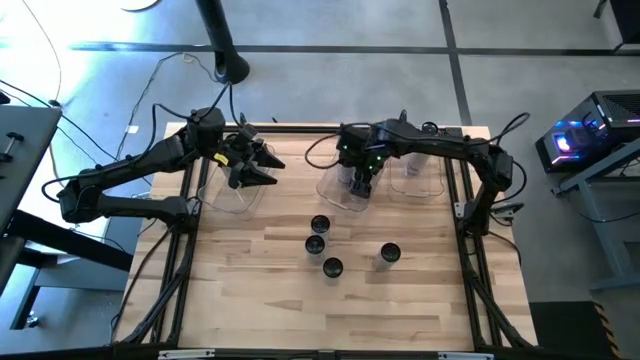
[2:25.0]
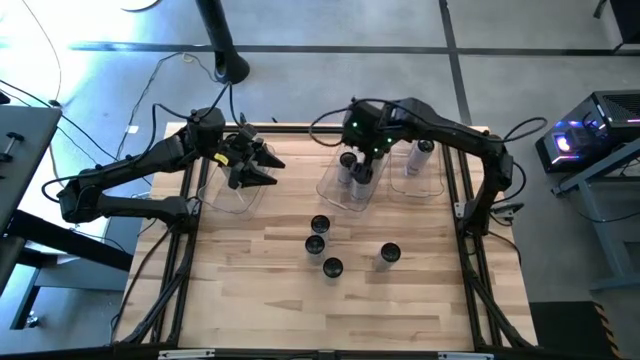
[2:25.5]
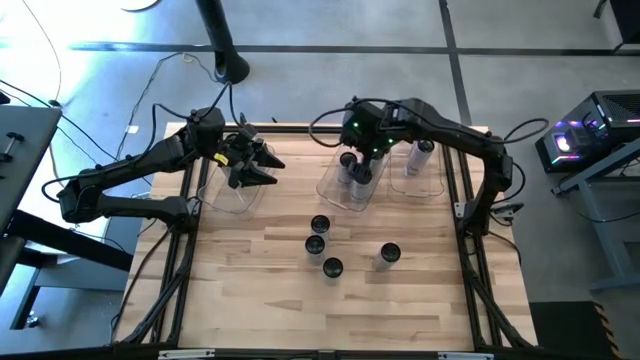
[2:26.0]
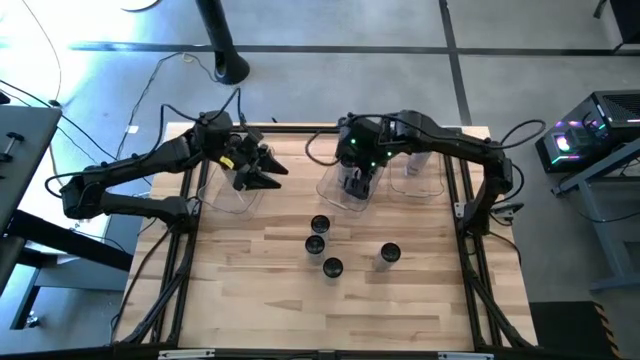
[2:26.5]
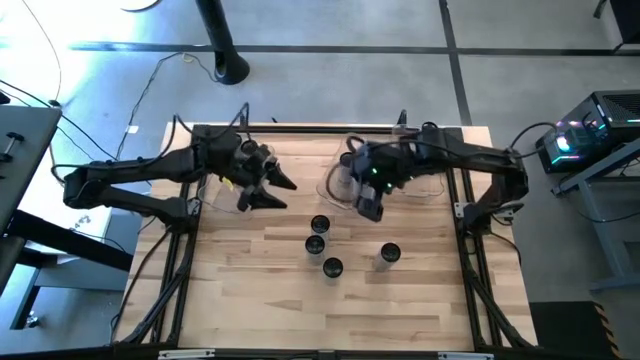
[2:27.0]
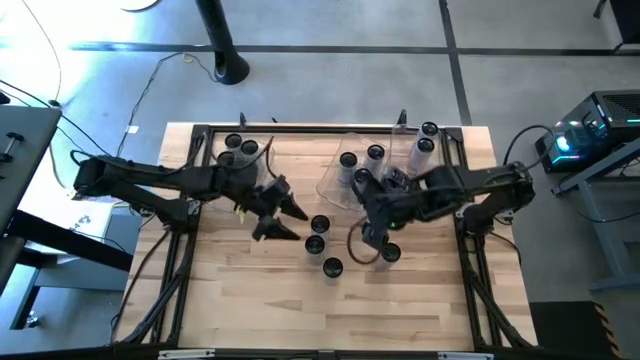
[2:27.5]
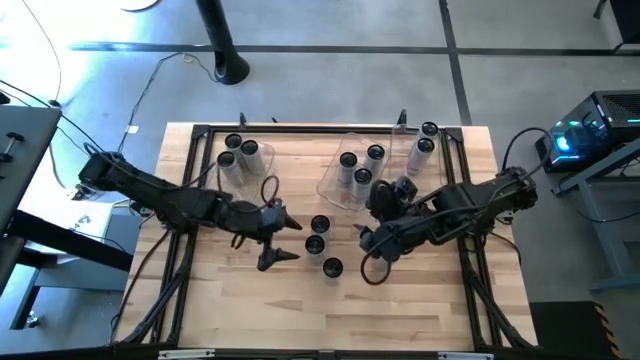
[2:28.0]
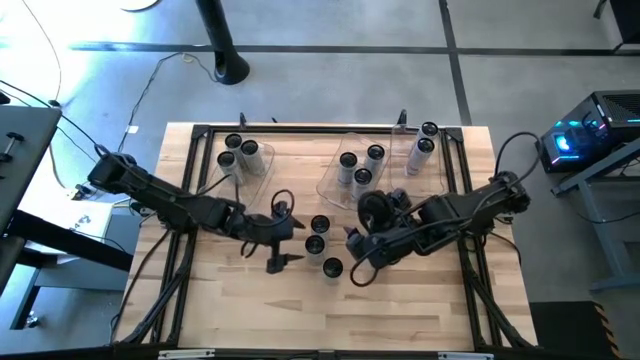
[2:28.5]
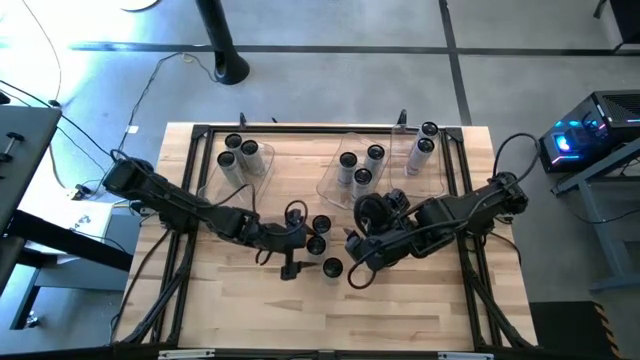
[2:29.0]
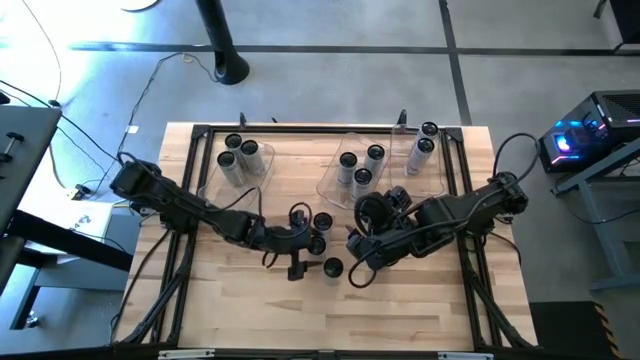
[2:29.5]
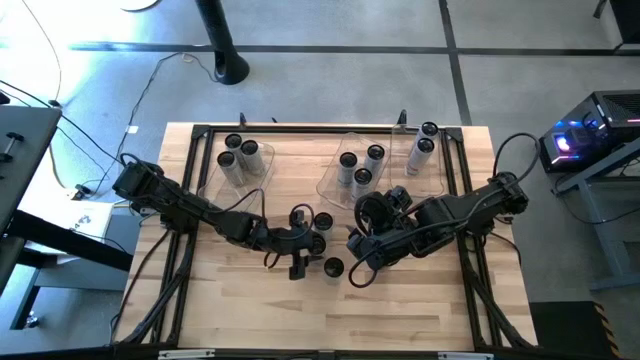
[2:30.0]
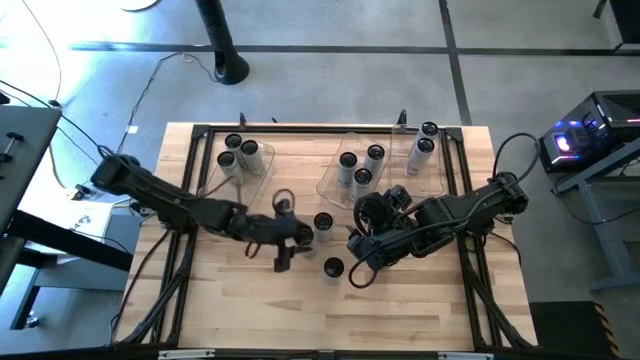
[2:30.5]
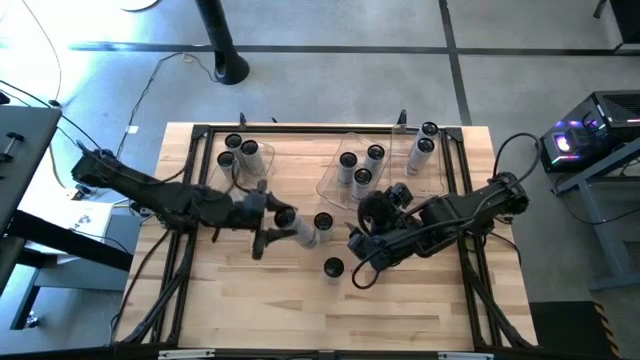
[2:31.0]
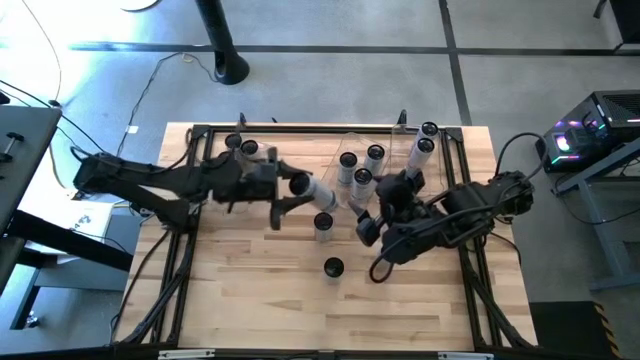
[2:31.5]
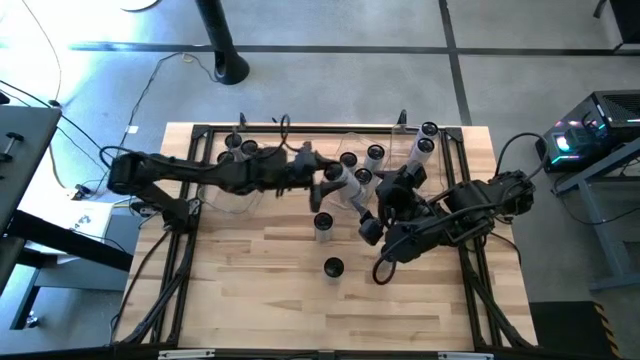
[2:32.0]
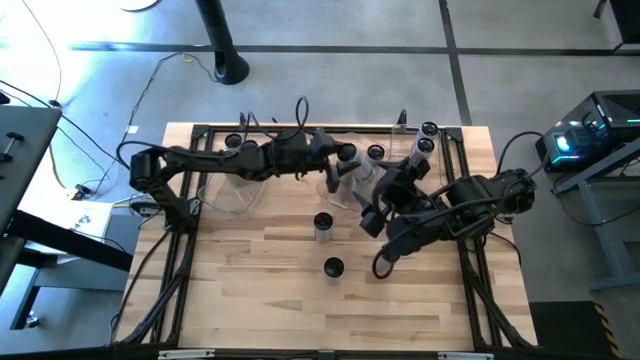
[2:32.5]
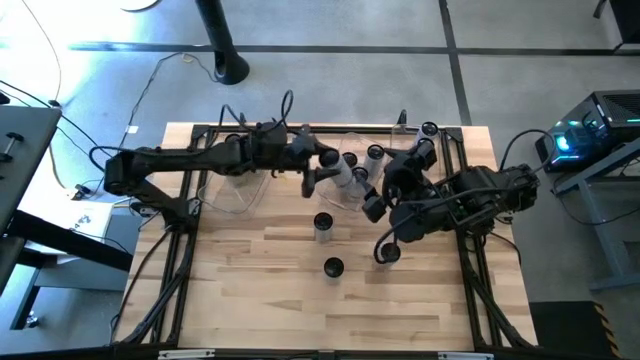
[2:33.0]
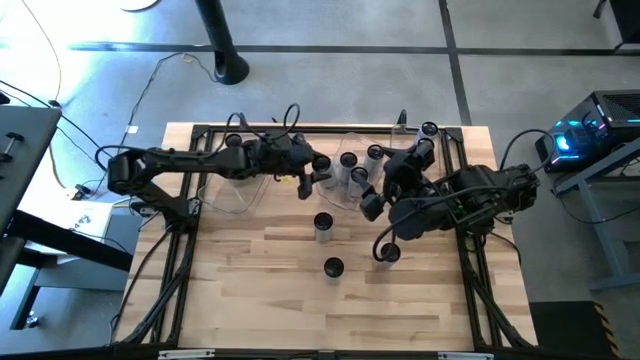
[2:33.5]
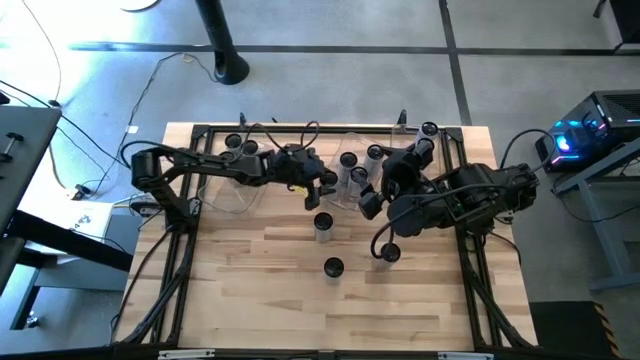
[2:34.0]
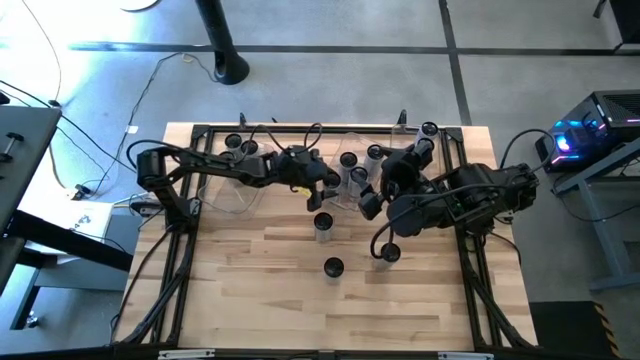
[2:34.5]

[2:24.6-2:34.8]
Task: Sort soda cans
Put the white-blue soda can into the top center transparent bin

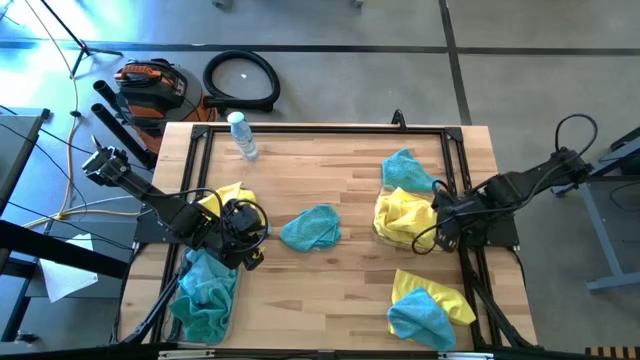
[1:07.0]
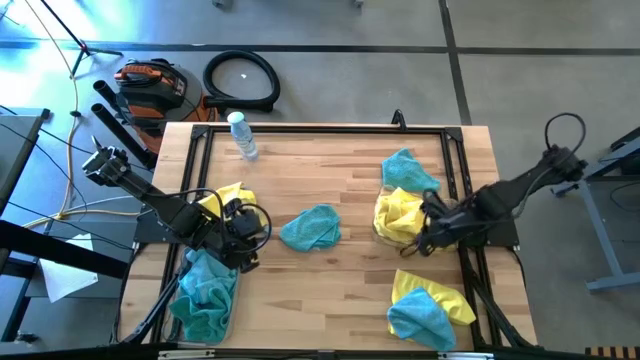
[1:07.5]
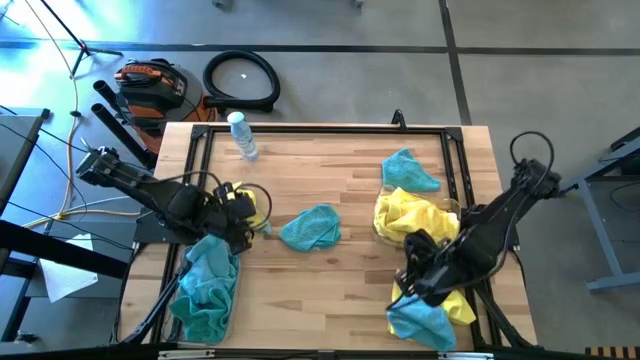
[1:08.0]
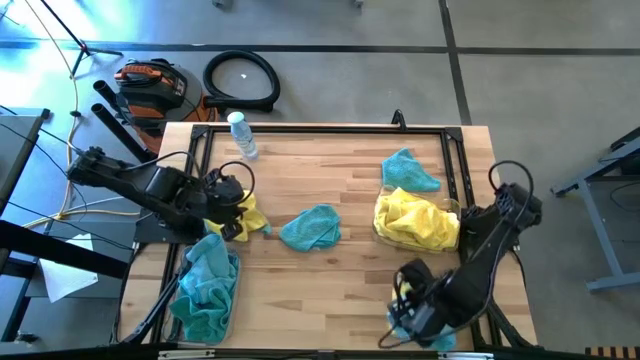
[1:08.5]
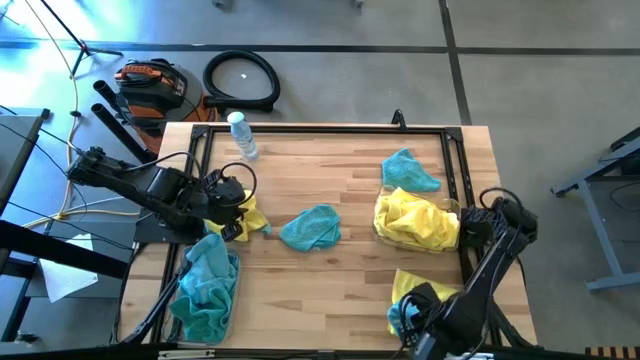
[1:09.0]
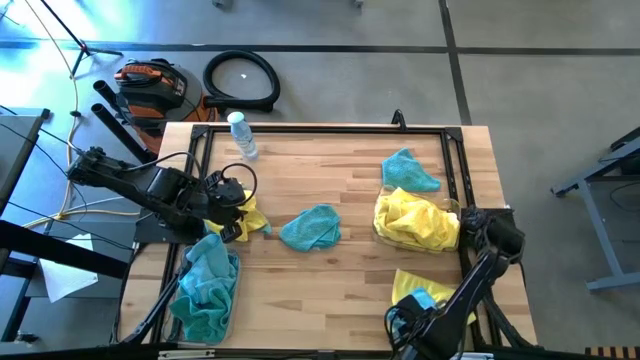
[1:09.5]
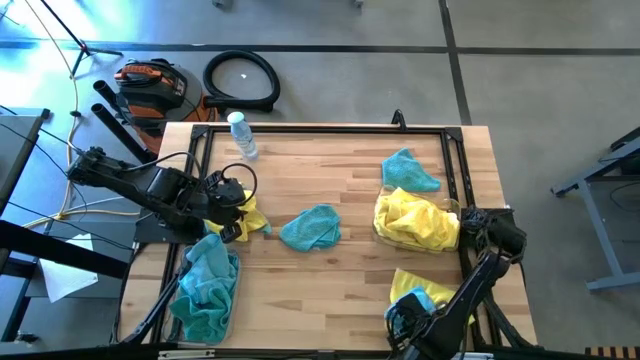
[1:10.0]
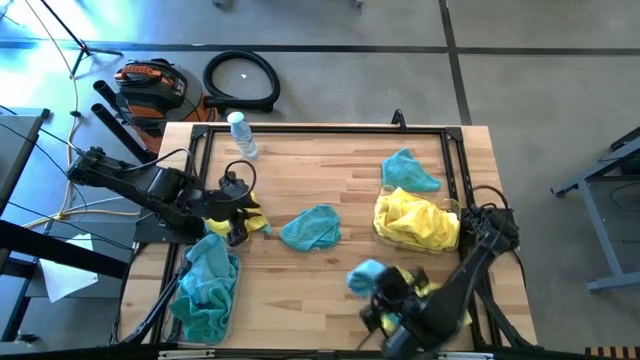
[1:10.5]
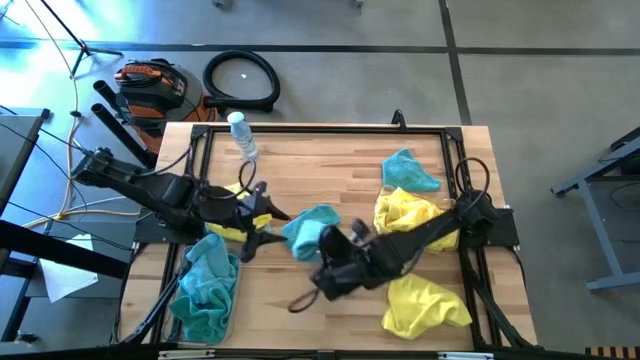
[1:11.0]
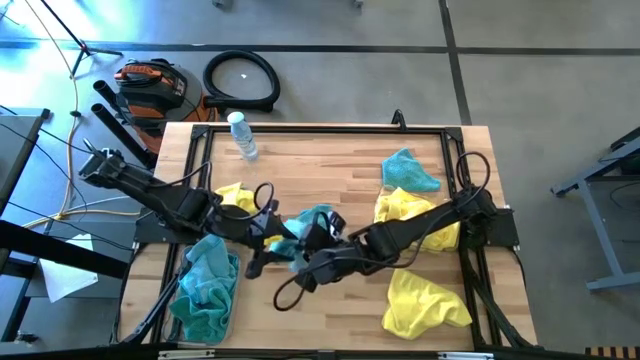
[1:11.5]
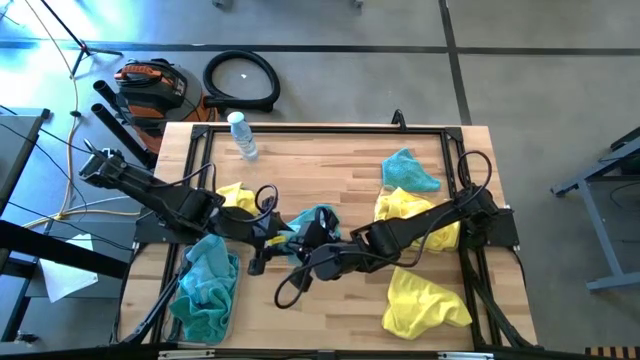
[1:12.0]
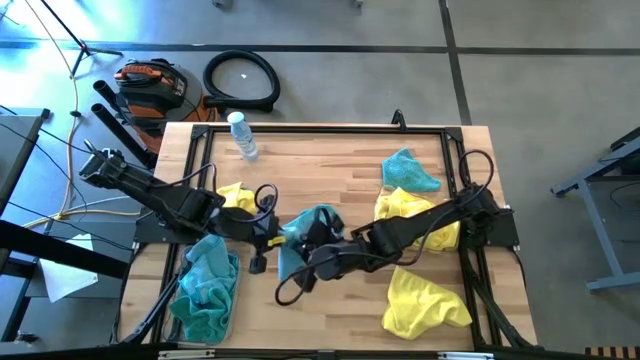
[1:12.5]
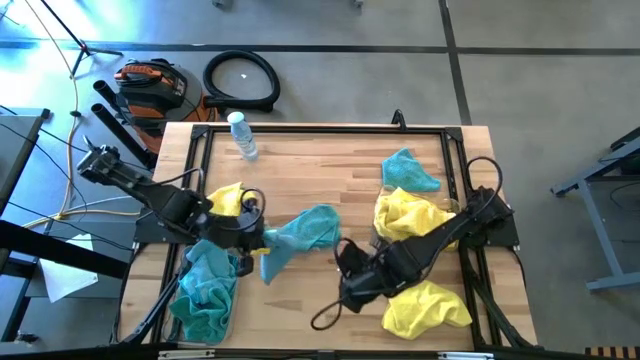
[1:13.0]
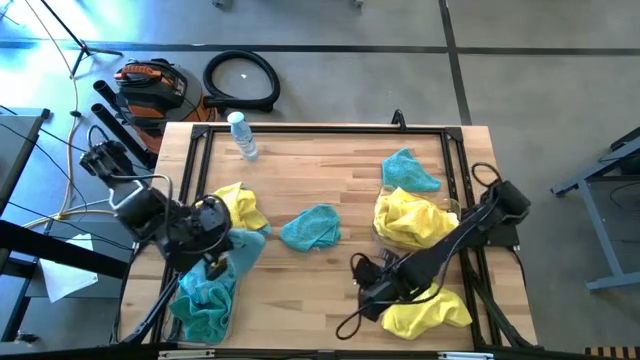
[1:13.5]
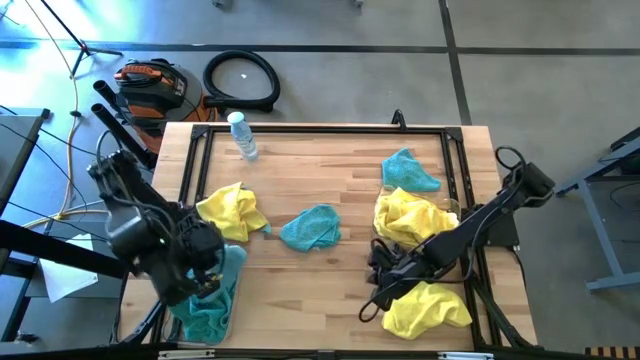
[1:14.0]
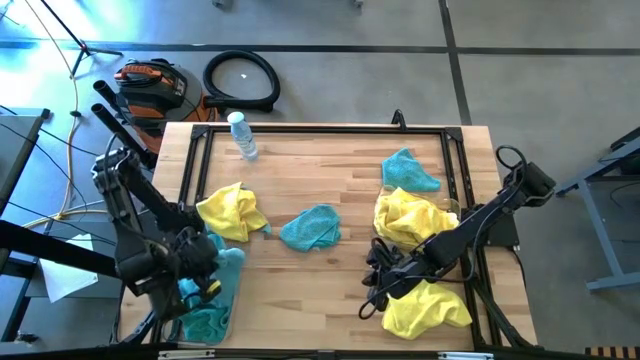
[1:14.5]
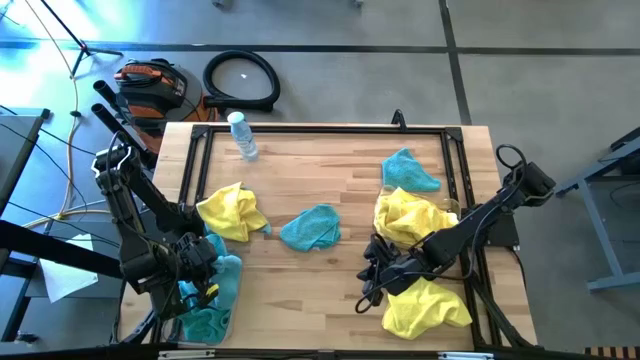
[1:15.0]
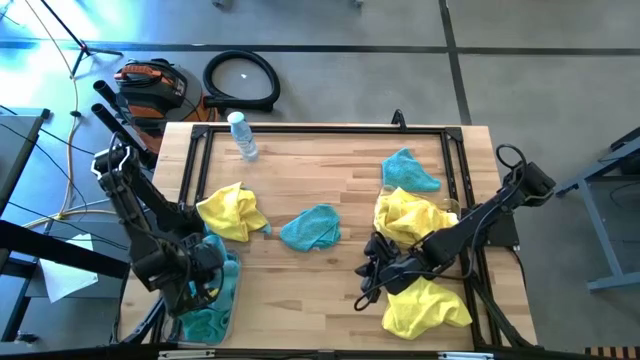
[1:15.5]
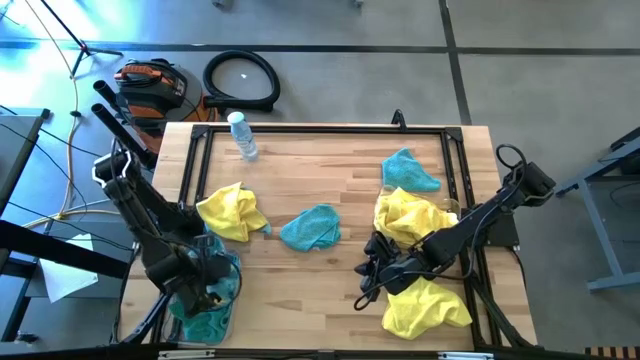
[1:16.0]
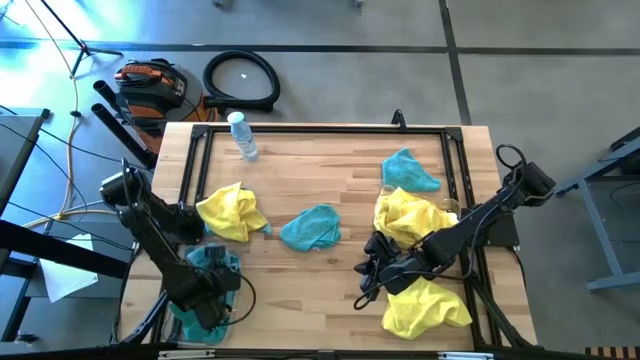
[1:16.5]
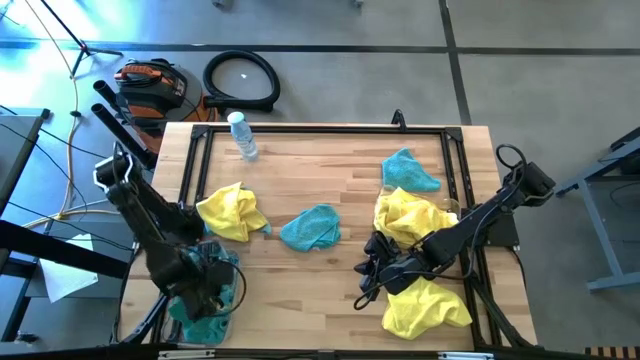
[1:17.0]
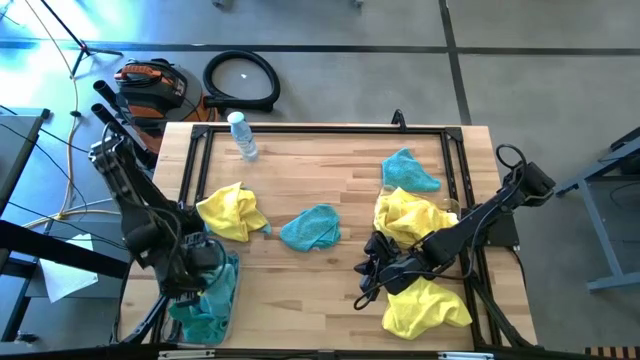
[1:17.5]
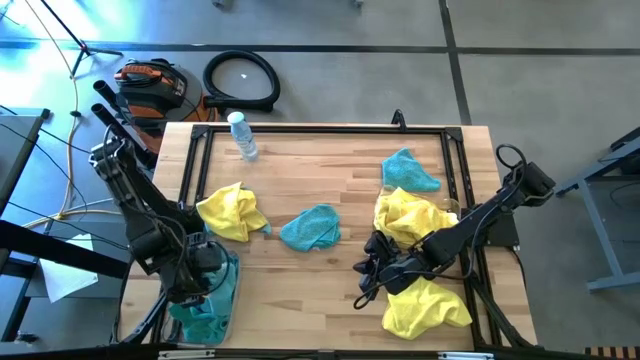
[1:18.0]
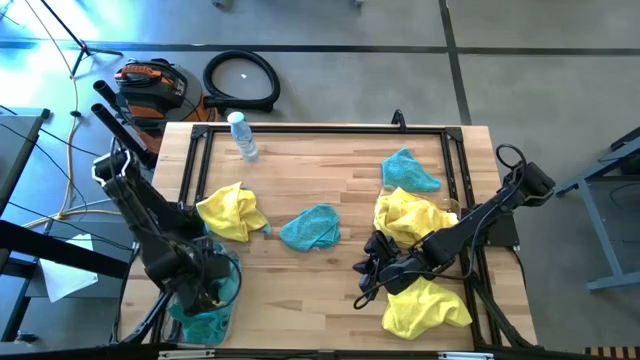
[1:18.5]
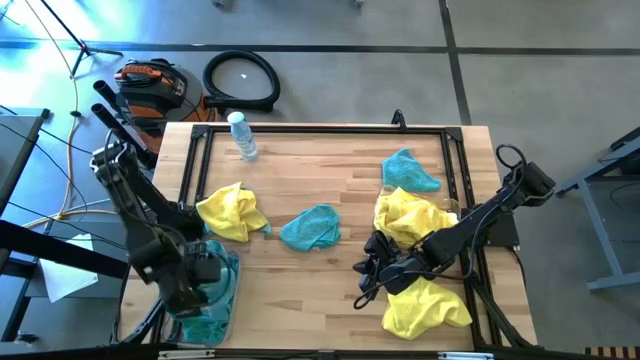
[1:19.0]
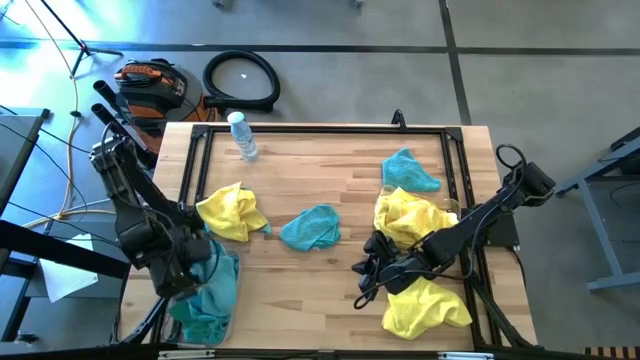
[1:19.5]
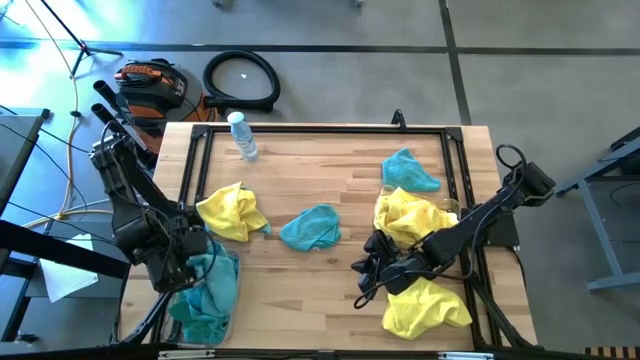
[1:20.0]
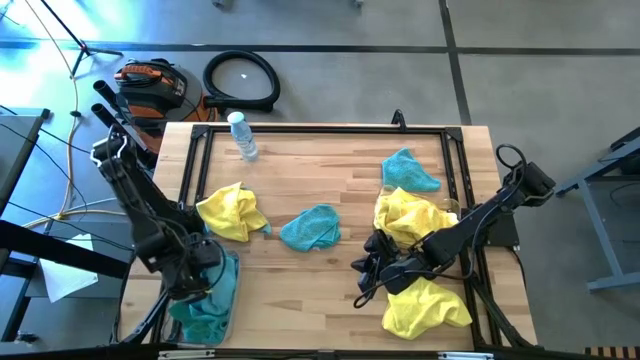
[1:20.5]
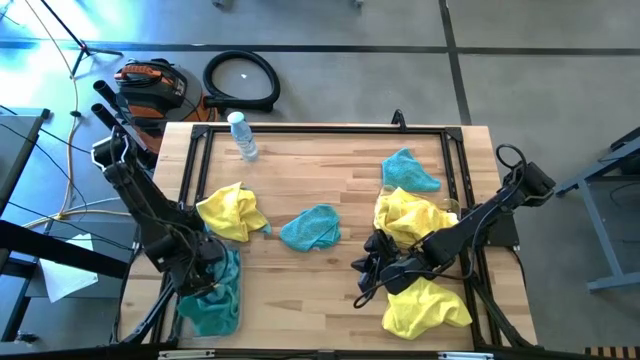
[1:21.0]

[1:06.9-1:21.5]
Task: Sort microfiber towel by color & place in baskets
Put the blue microfiber towel into the right transparent bin
